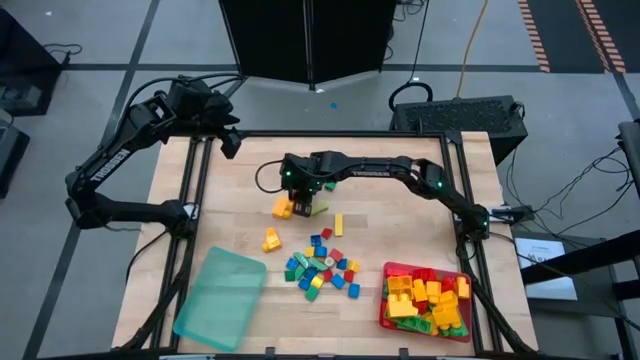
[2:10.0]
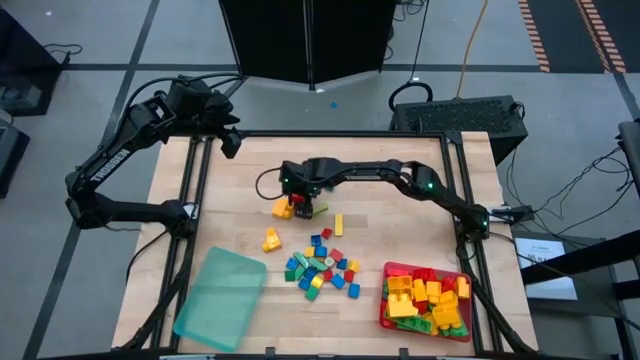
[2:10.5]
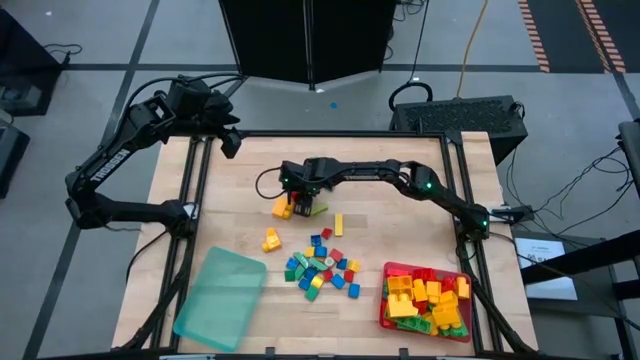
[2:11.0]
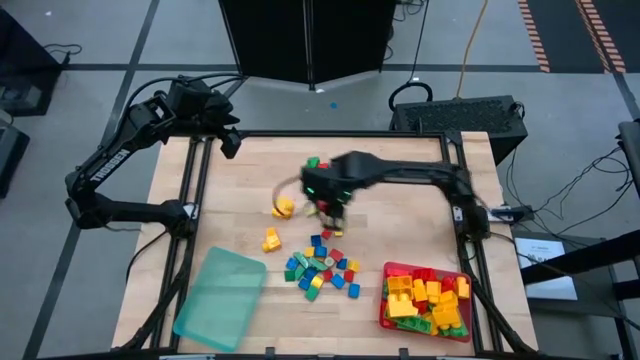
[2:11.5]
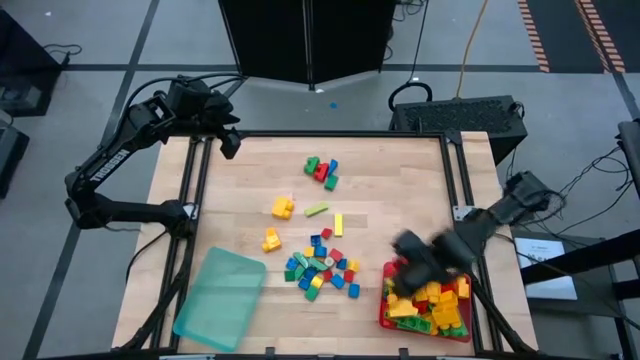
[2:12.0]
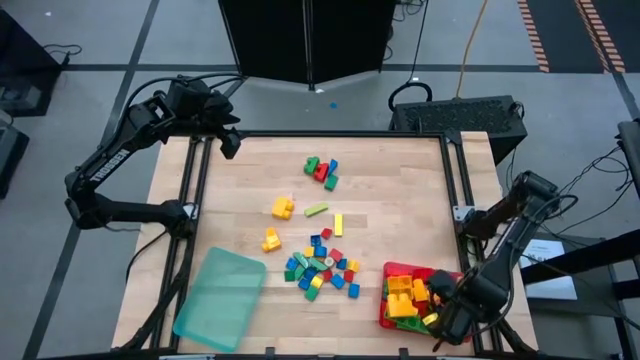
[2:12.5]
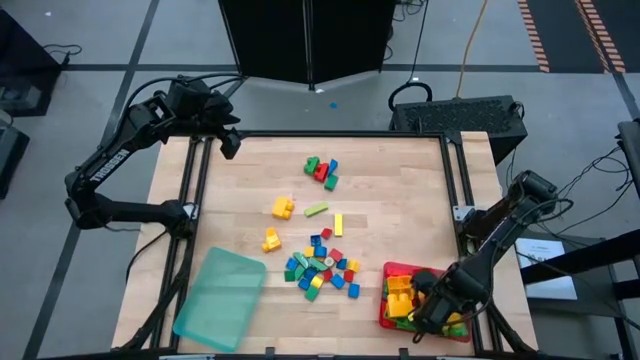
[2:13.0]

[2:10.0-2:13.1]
Task: Sort blocks by size
Put the 2-stud red game piece into the pink bin

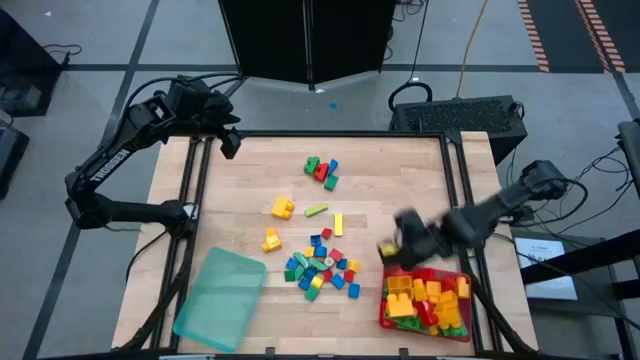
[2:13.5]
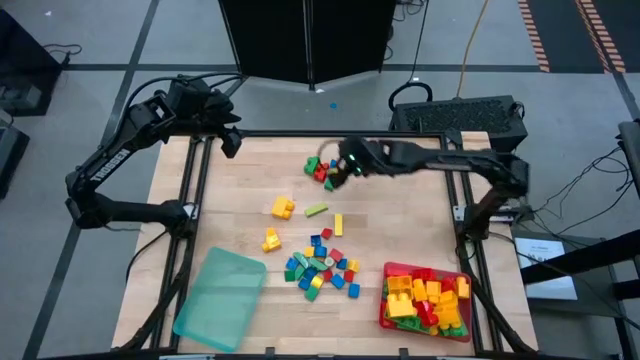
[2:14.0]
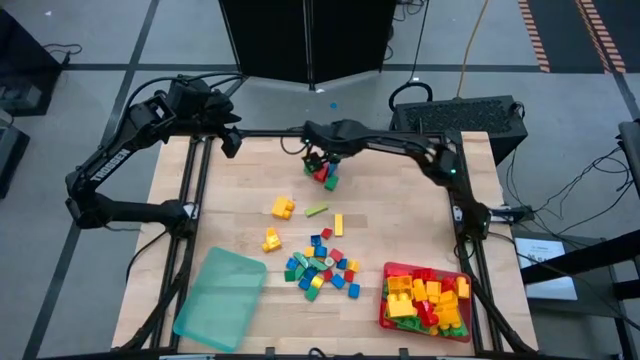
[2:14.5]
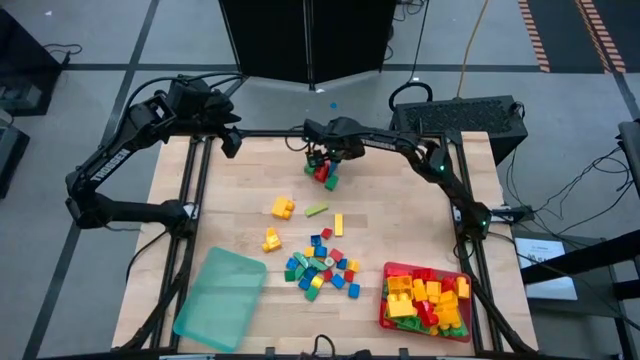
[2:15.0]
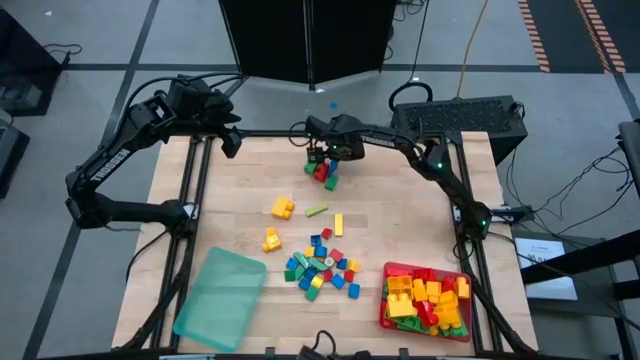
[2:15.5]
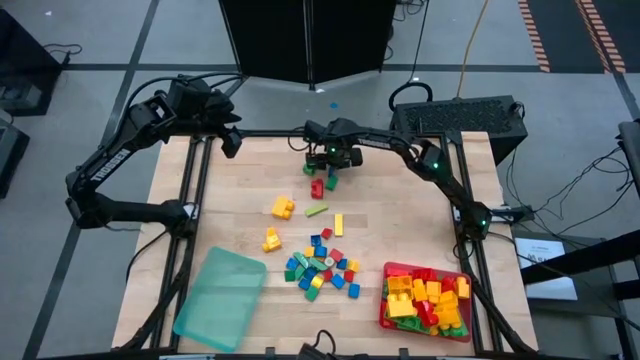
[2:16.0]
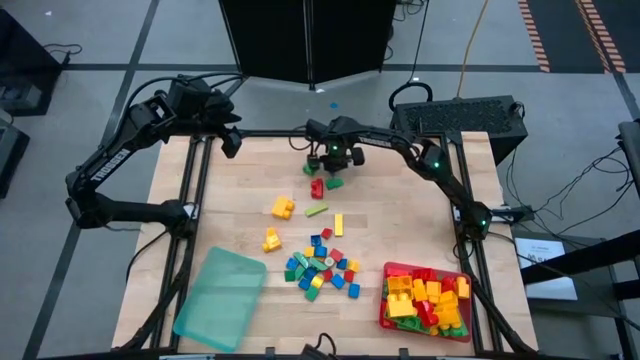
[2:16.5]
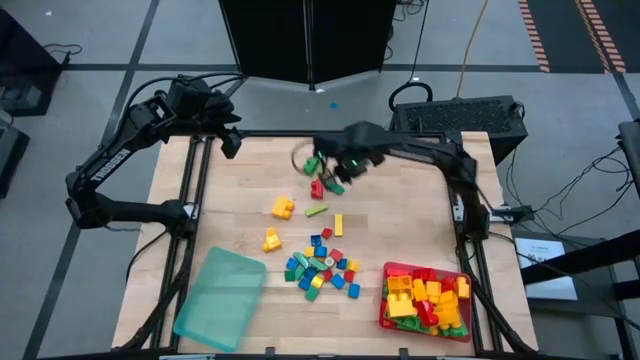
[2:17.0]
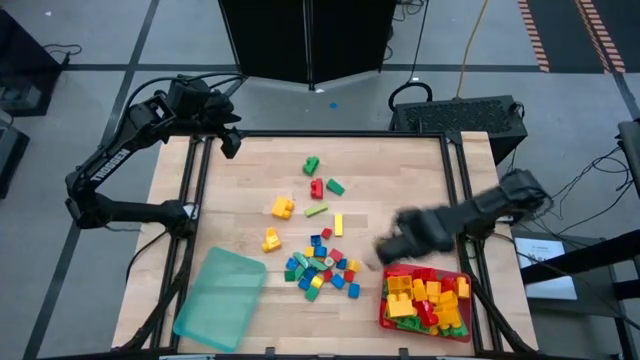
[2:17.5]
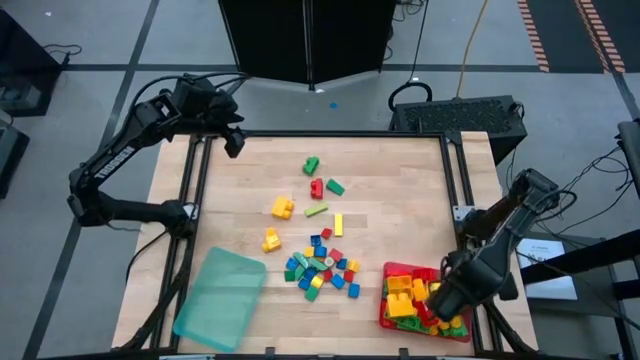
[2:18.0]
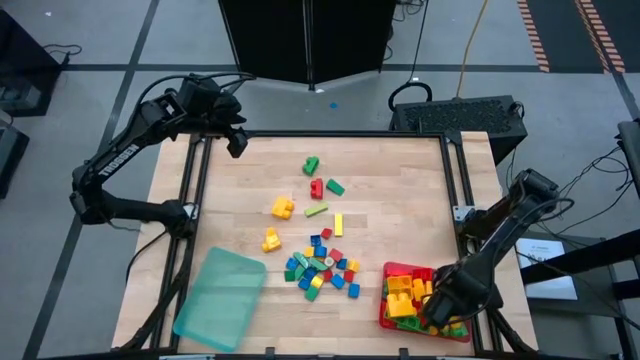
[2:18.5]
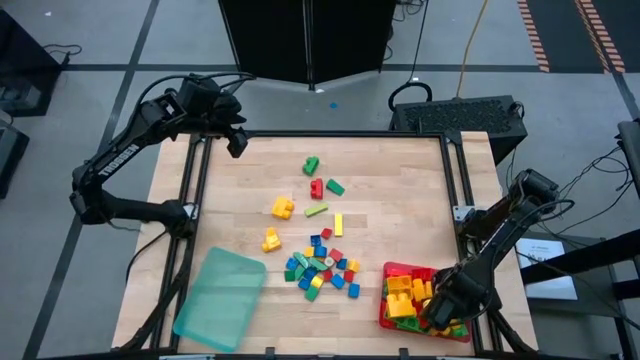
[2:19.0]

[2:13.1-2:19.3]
Put the blue block into the pink bin

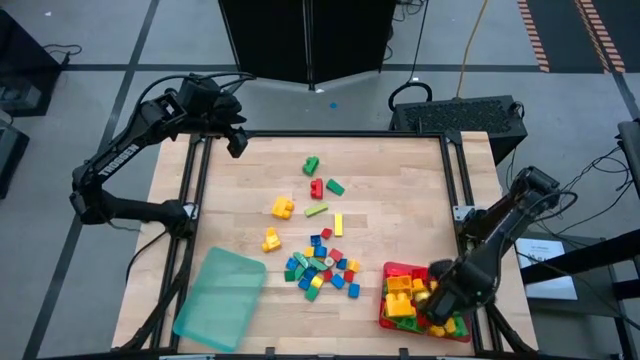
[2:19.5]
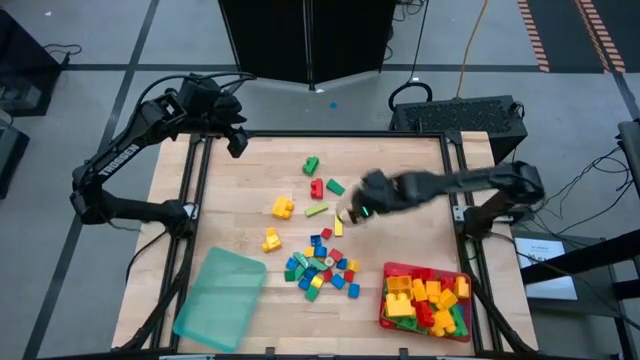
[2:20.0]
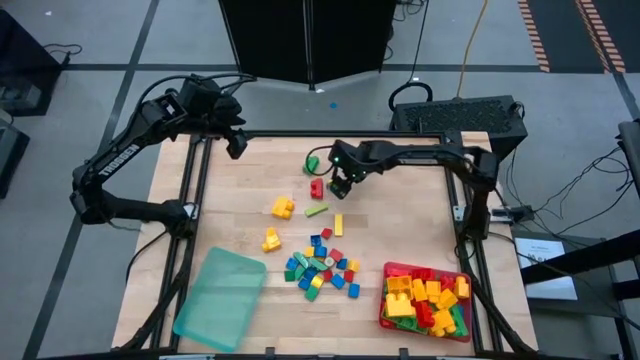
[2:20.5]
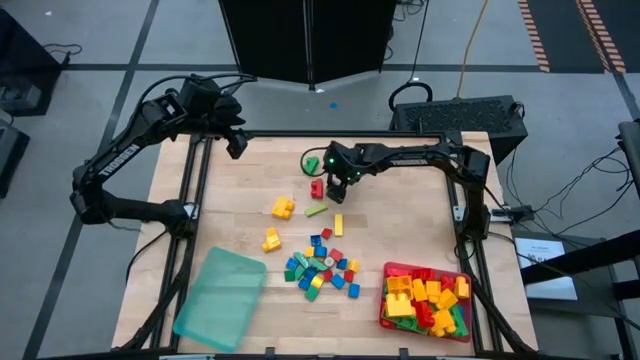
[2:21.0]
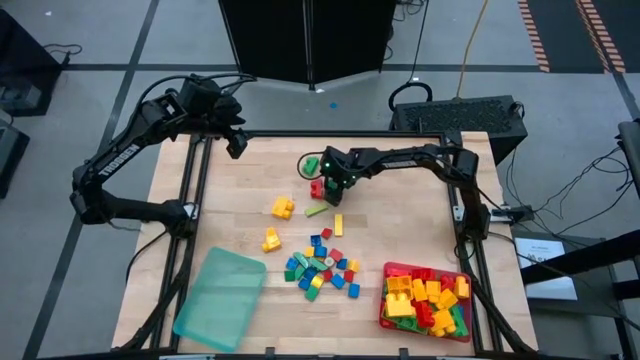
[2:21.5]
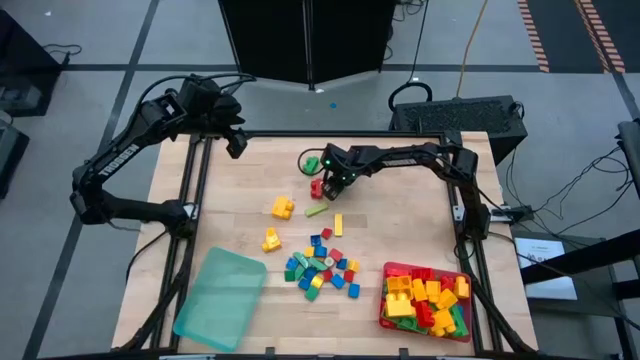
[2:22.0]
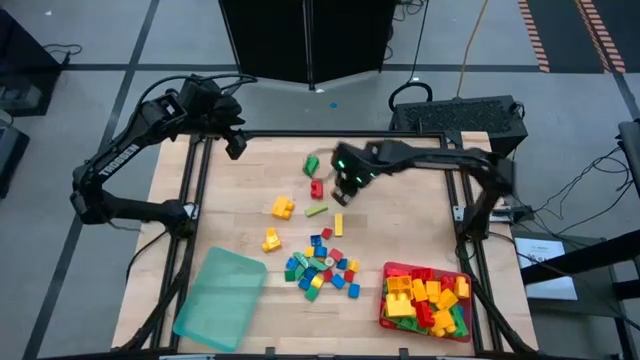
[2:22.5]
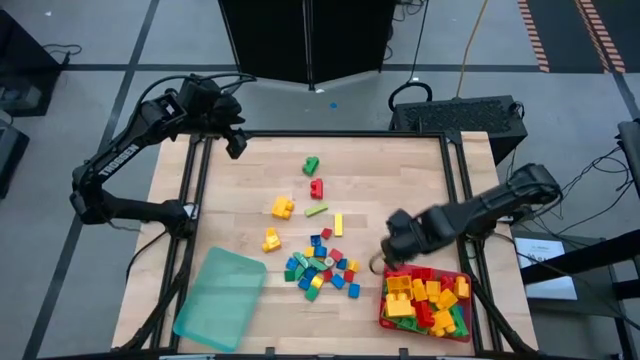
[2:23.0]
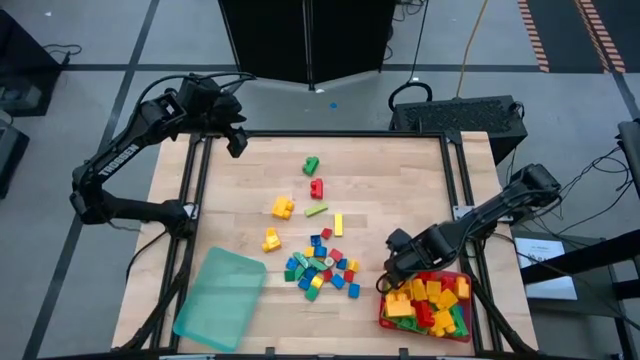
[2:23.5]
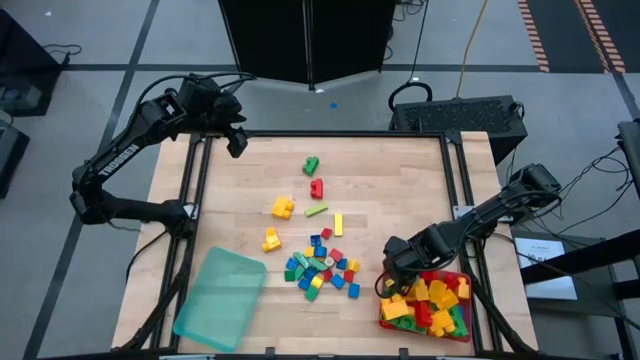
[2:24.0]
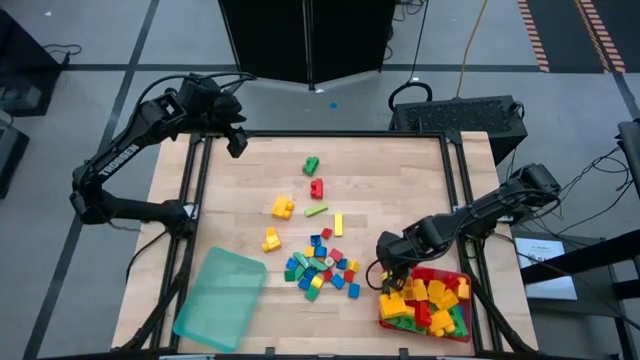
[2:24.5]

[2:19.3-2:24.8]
Put the green block into the pink bin

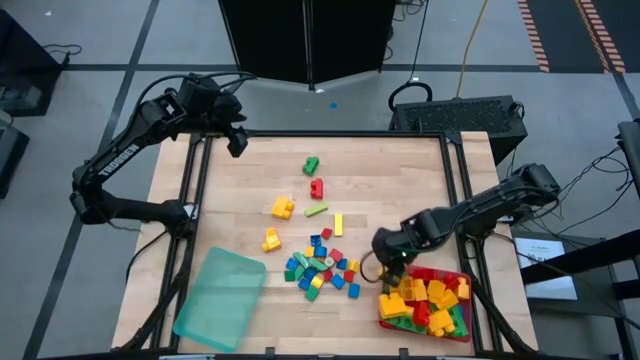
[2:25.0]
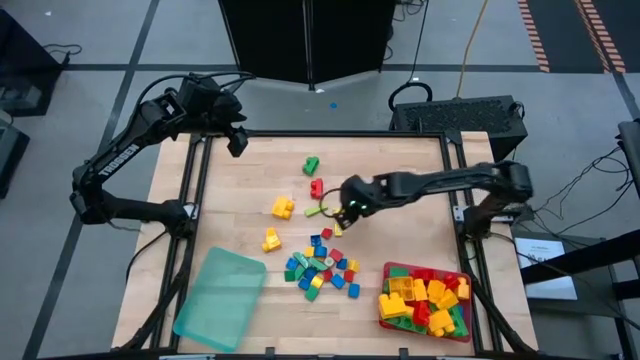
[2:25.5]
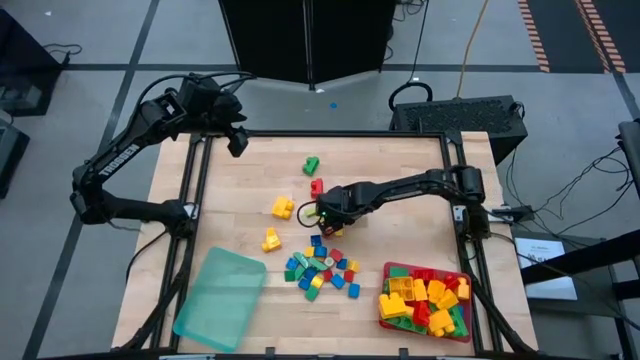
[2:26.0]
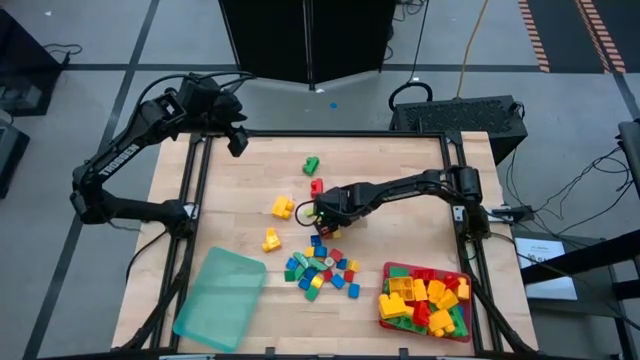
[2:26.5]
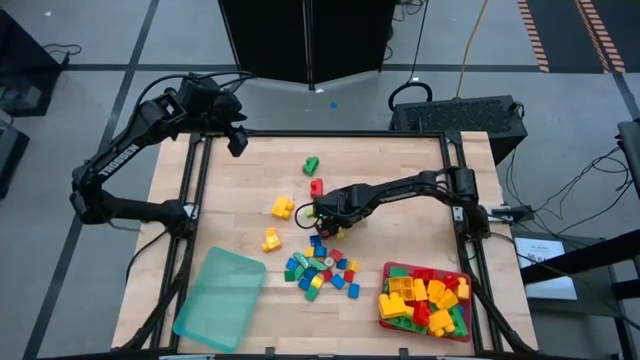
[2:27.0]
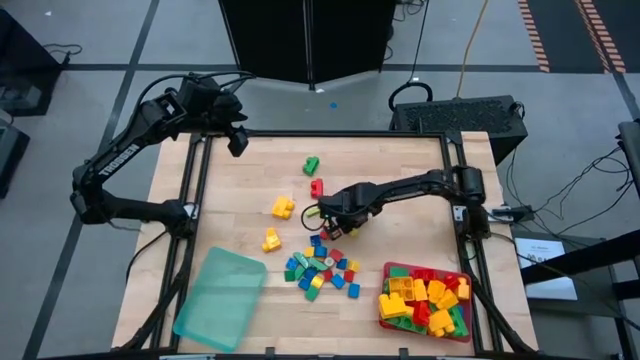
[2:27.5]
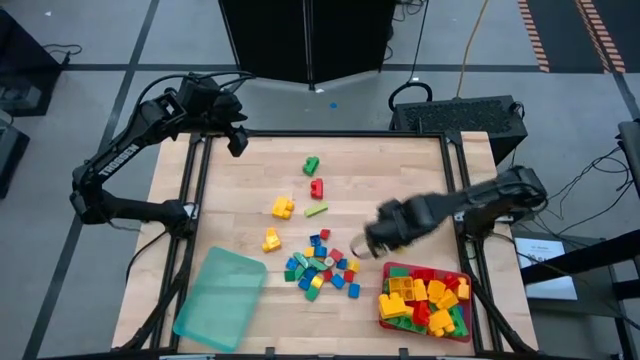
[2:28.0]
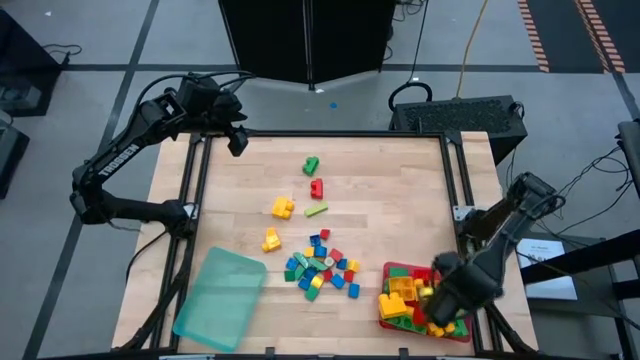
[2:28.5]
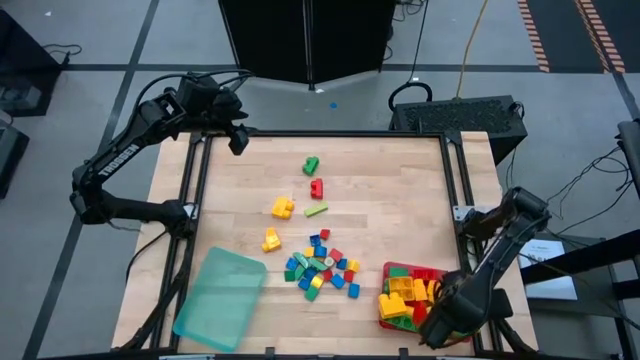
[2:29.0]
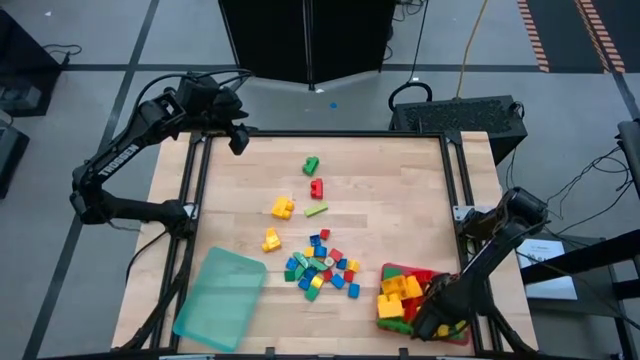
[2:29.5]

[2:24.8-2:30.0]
Put the yellow block into the pink bin

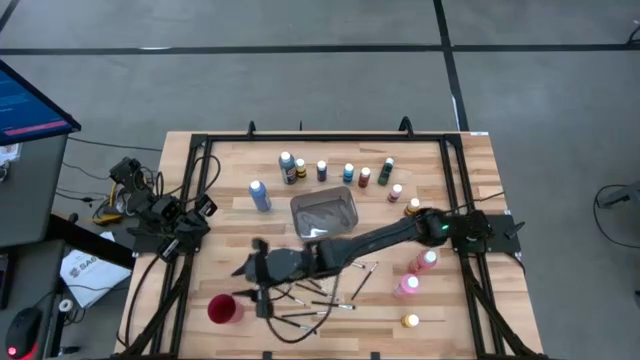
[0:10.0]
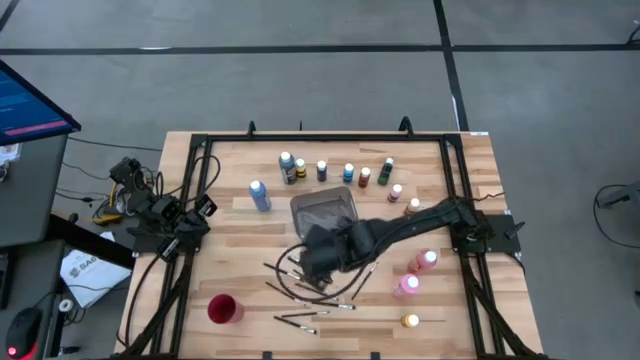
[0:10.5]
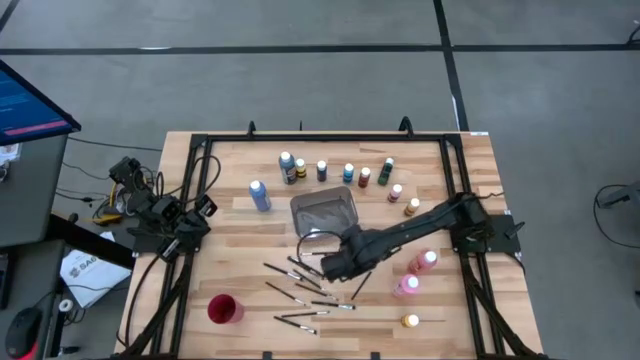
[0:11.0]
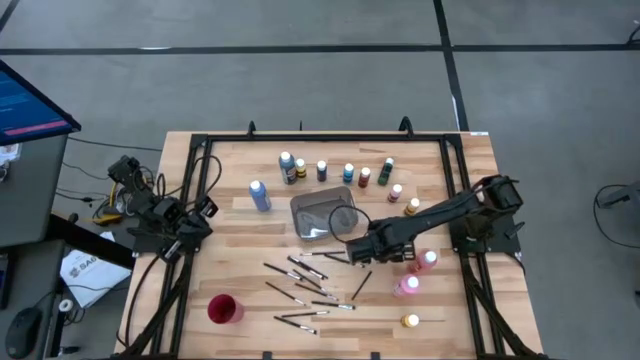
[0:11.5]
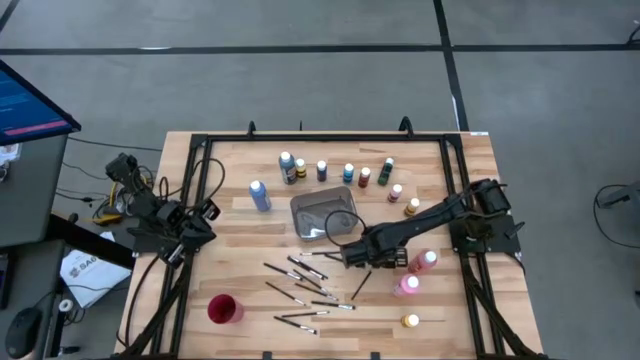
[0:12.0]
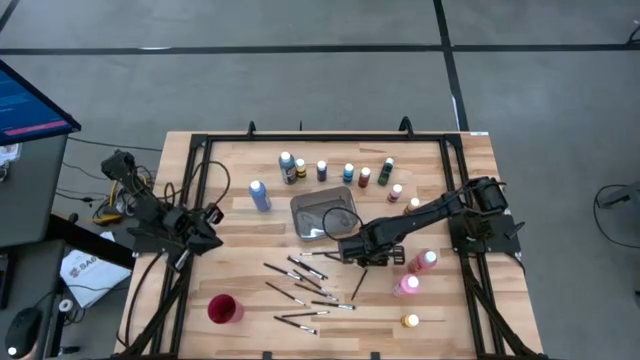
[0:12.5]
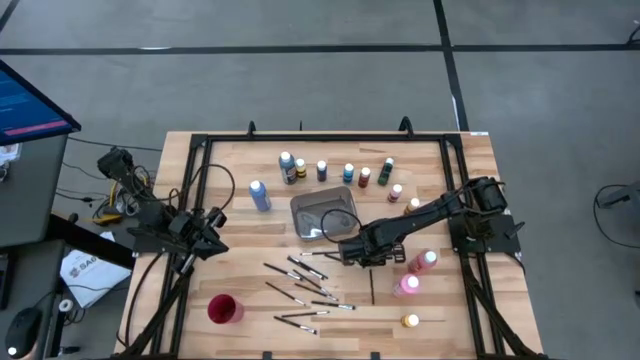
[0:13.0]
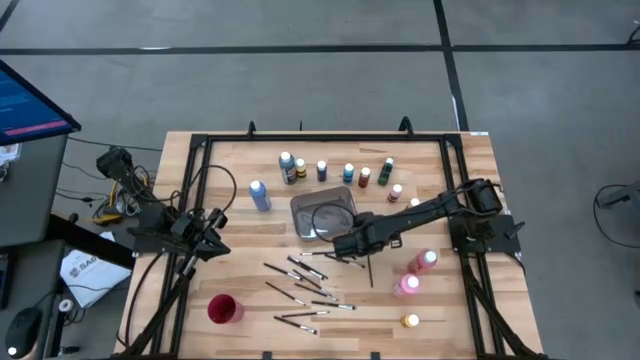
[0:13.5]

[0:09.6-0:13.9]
Task: Pick & Place Paint Supplies
Put the silver paintbrush into the red cup
